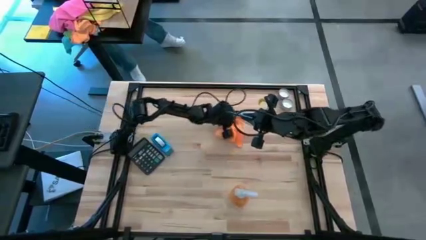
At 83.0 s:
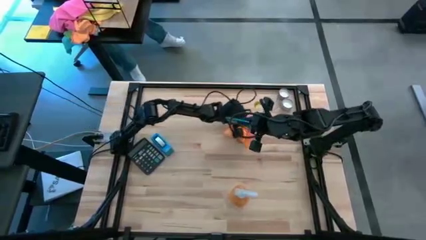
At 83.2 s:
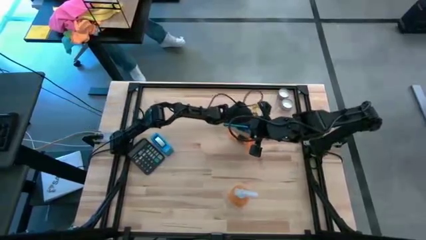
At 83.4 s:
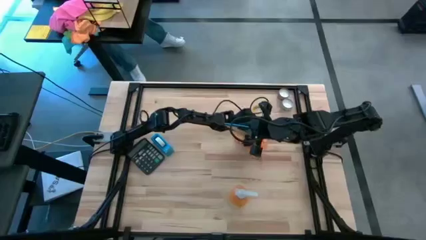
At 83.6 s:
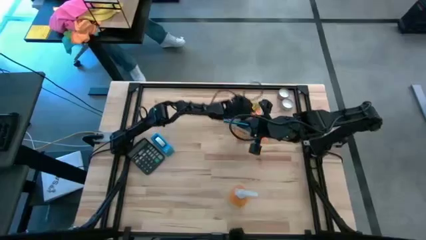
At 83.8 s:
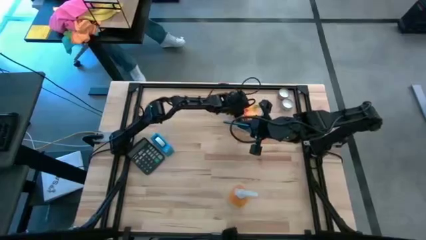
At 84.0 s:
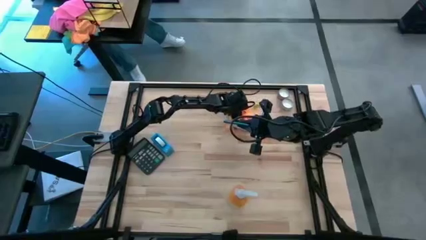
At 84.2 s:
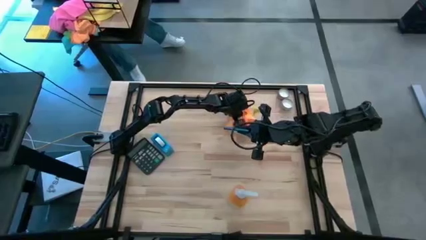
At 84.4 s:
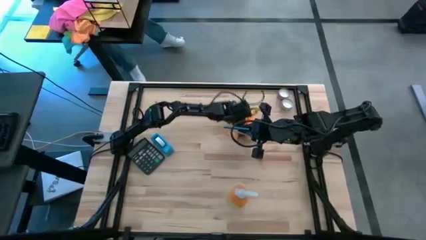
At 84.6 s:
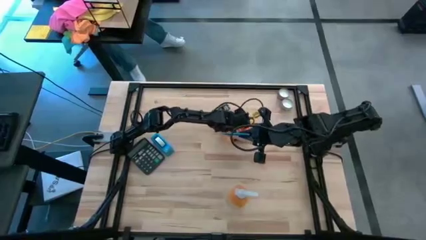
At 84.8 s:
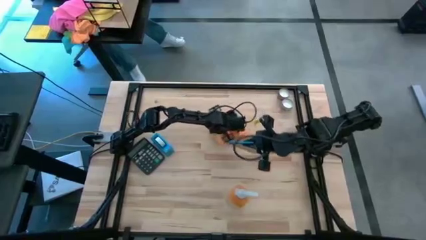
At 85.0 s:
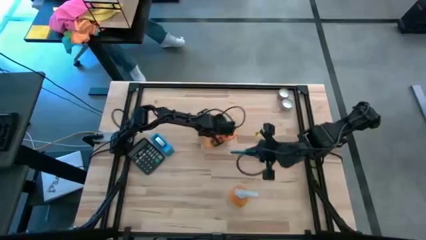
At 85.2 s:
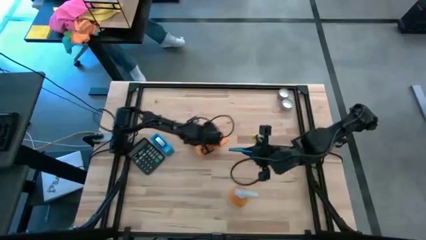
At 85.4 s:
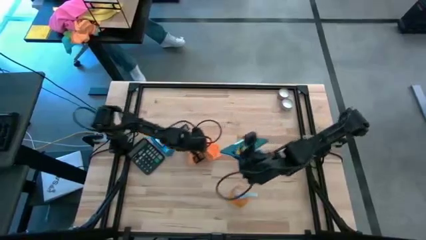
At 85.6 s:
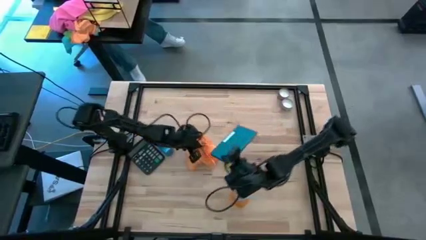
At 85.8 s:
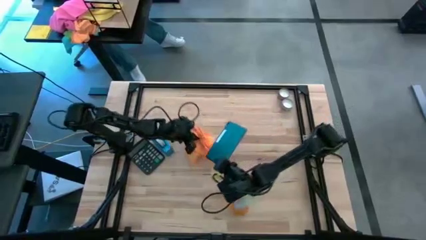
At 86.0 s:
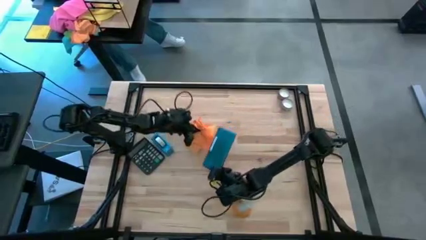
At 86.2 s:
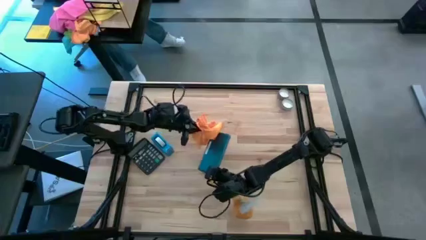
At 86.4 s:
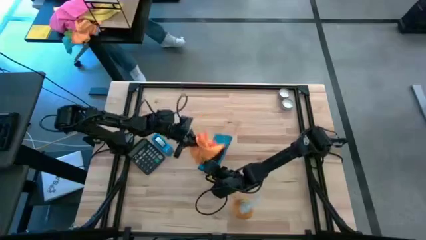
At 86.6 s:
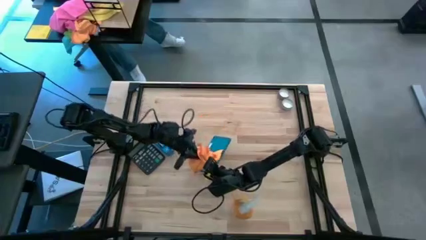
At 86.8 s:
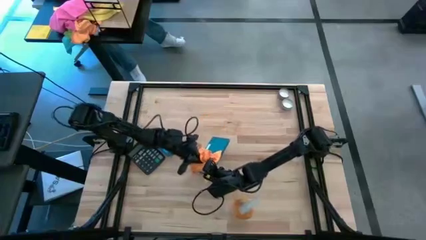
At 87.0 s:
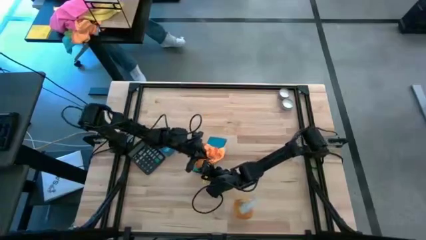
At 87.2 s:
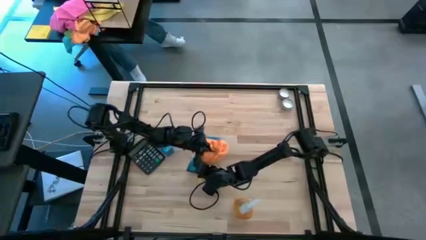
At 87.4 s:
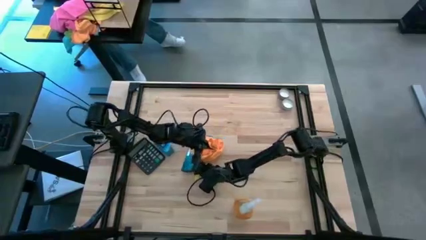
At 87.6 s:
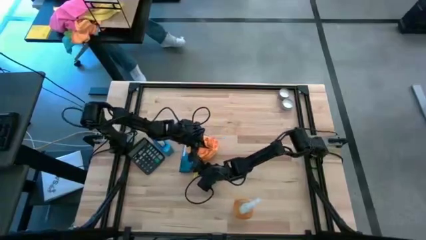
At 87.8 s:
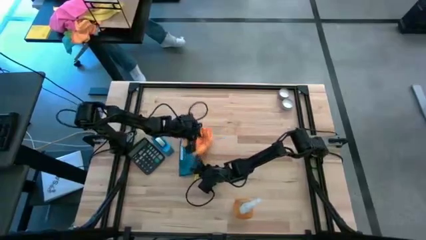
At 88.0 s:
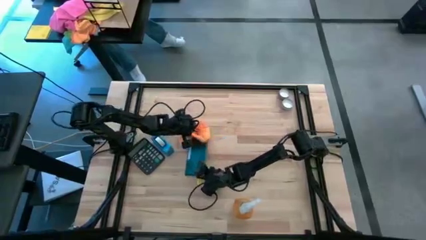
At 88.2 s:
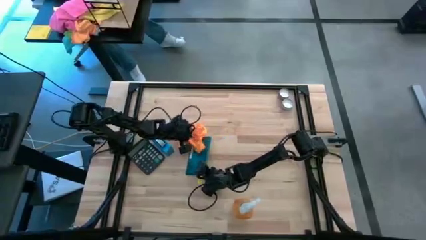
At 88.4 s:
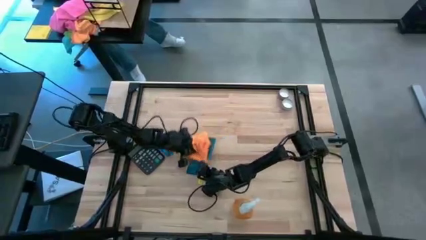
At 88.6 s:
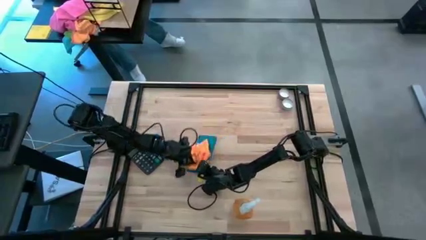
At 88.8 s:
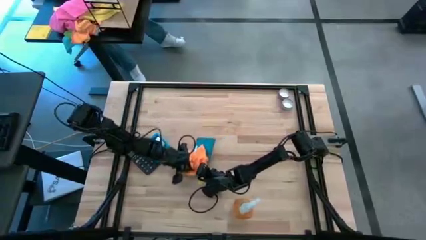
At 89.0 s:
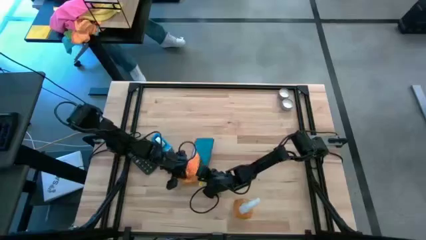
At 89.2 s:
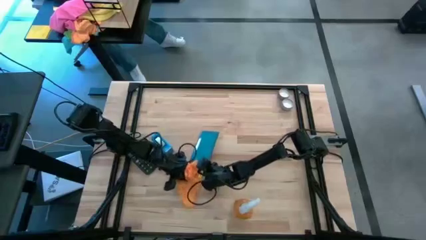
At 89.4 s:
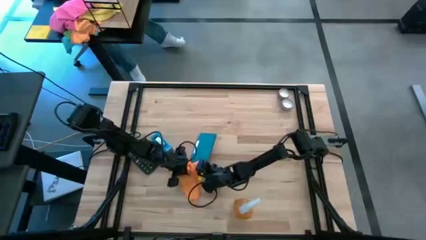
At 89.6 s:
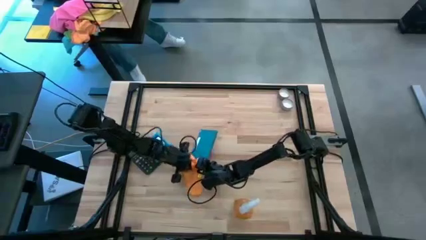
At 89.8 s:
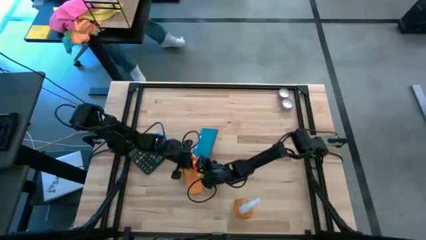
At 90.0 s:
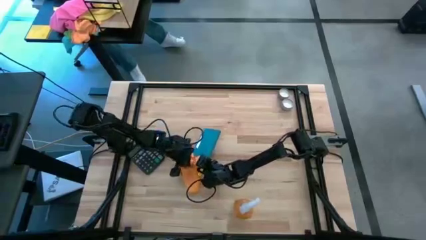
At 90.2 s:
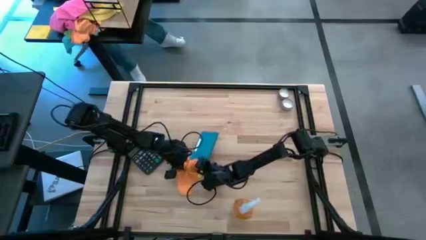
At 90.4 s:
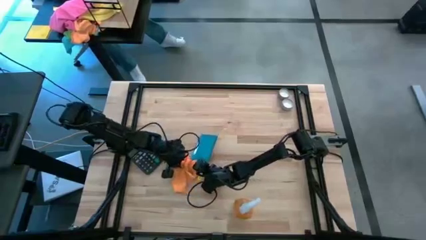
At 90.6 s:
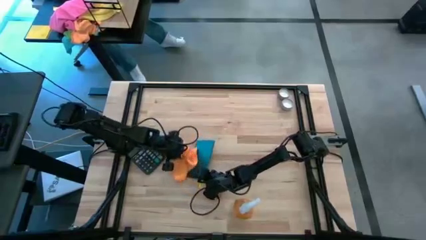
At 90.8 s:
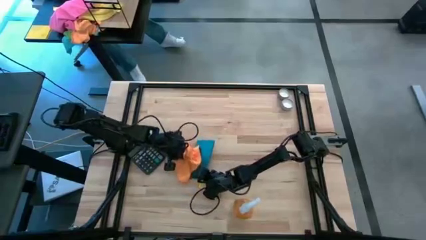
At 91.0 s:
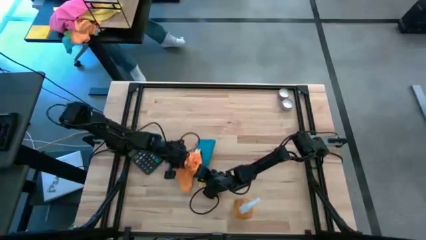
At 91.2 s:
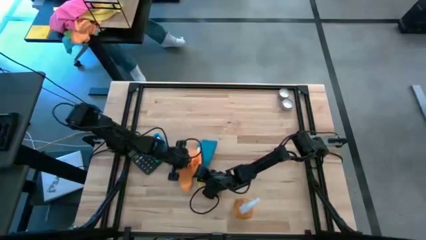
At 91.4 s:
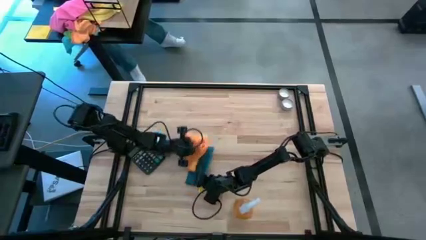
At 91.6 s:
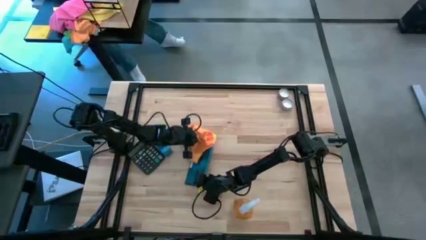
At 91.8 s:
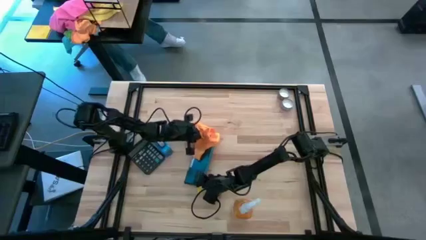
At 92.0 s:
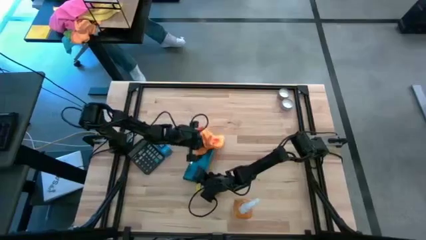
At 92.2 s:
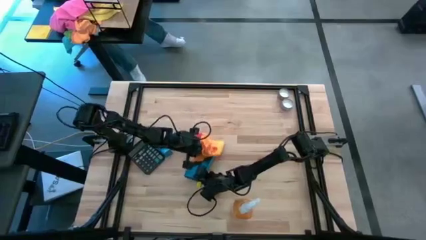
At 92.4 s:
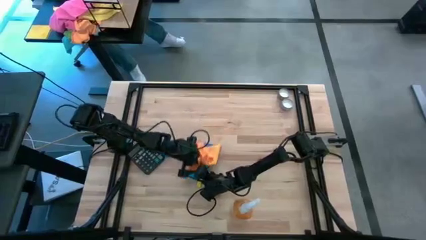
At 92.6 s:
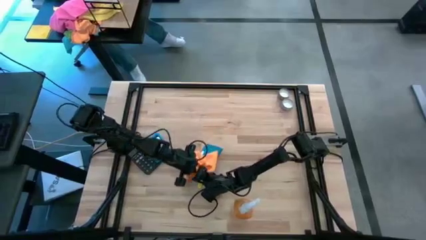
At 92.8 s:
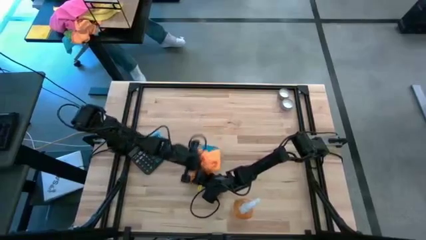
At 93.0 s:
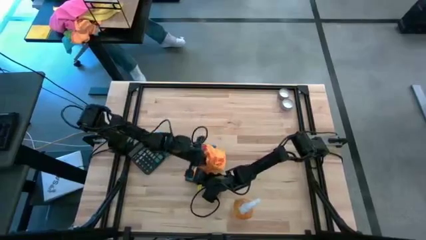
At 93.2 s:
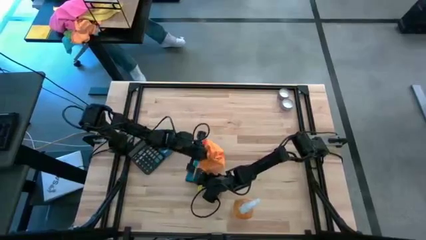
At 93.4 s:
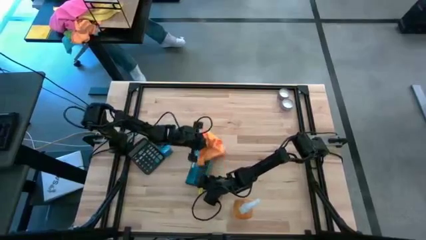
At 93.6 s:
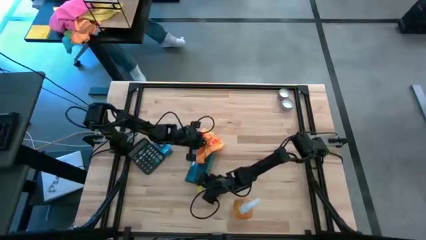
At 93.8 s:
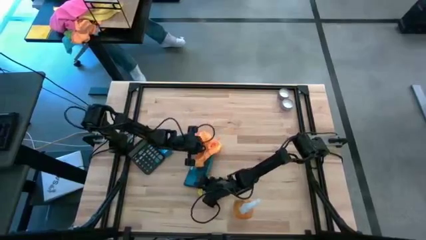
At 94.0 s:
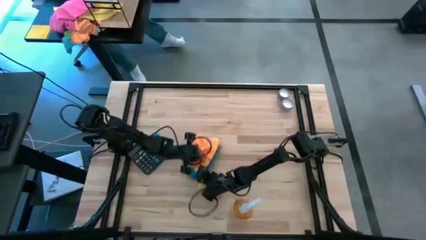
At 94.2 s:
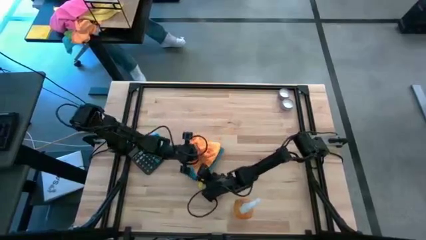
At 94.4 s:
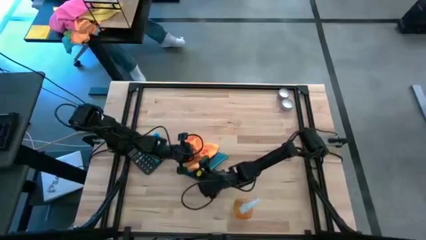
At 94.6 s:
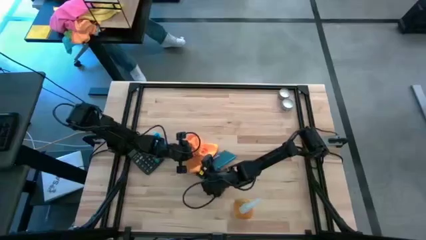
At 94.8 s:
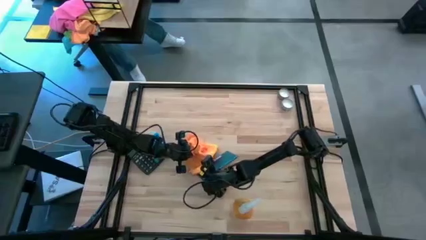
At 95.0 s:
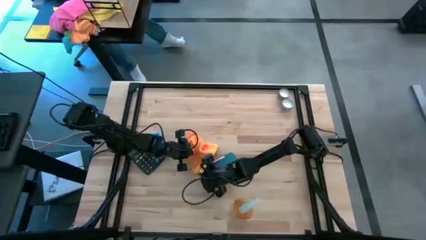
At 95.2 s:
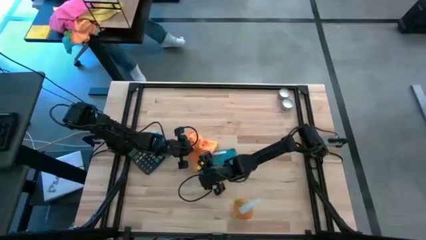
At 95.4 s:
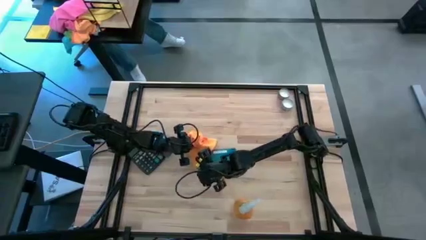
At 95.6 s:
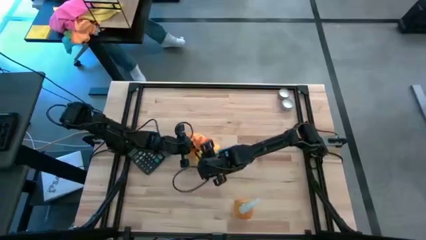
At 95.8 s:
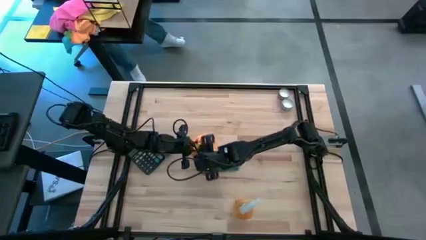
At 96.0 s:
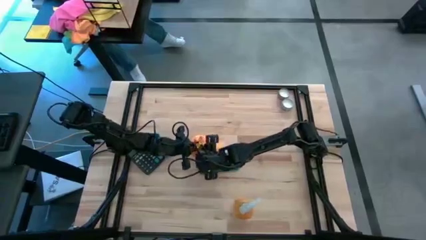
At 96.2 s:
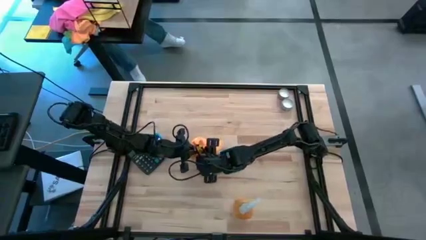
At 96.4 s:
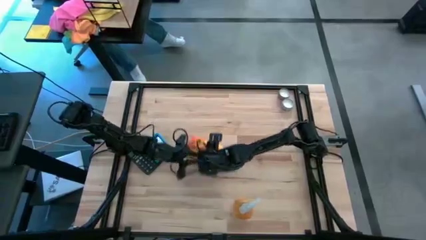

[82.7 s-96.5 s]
Task: Apply microfiber cloth
Wipe the blue phone with the orange microfiber cloth
